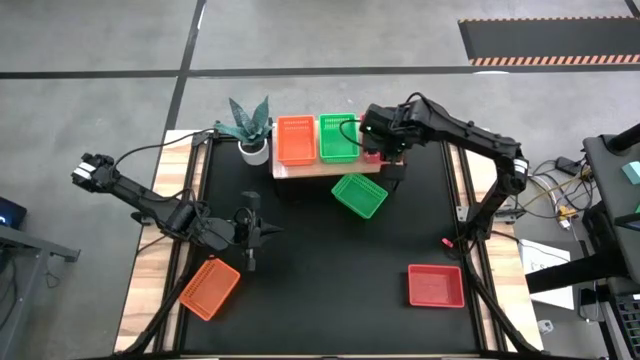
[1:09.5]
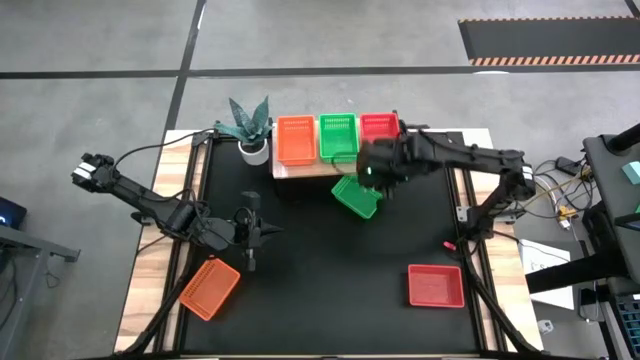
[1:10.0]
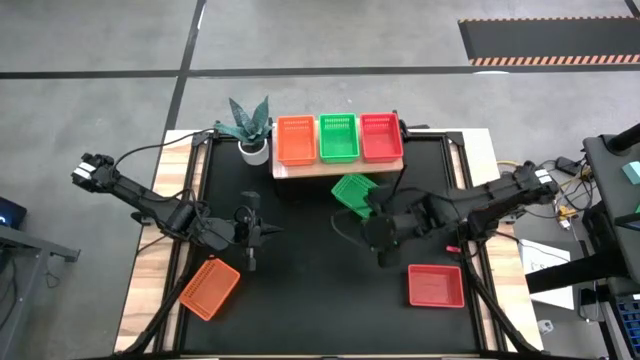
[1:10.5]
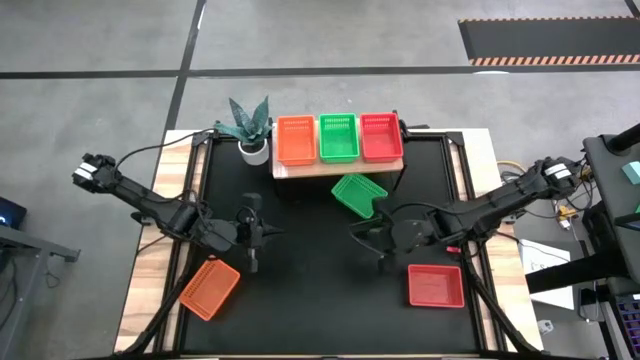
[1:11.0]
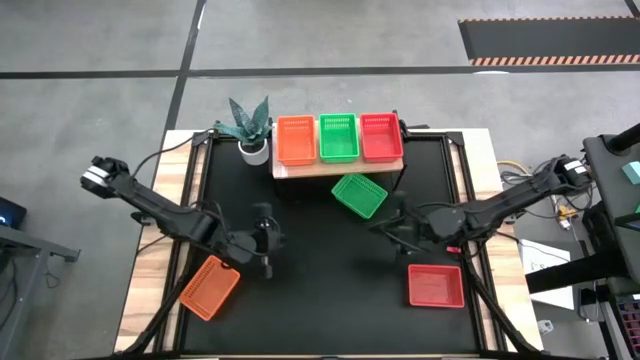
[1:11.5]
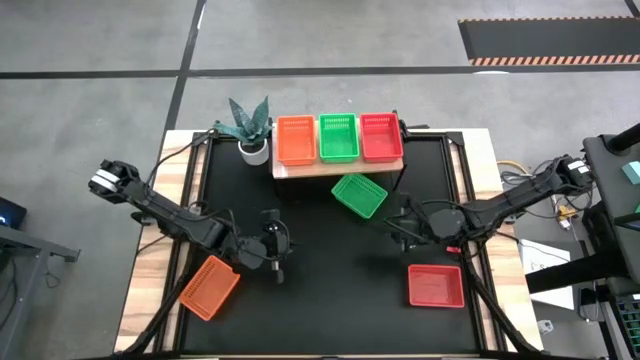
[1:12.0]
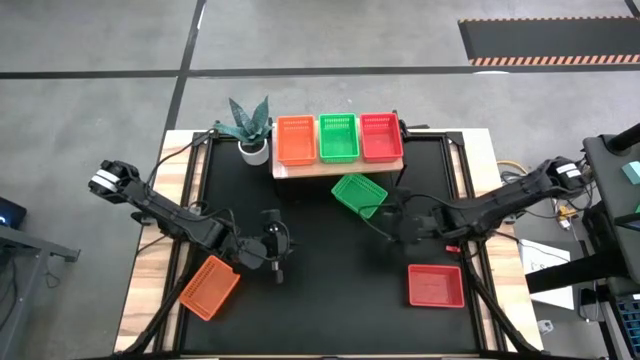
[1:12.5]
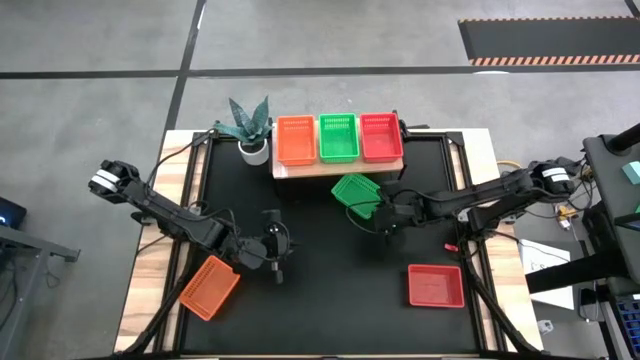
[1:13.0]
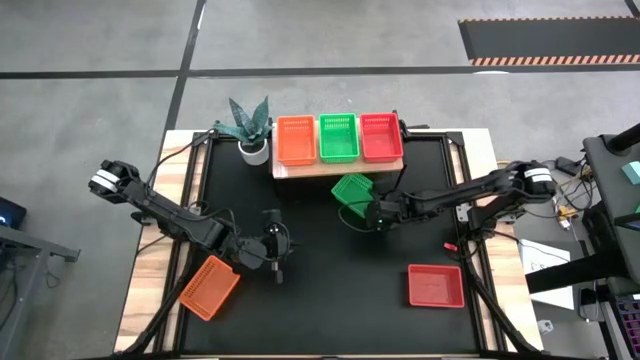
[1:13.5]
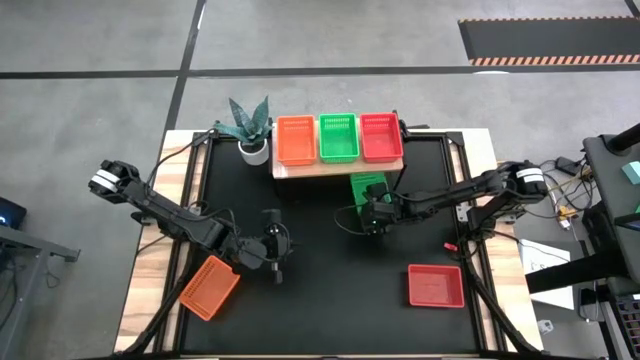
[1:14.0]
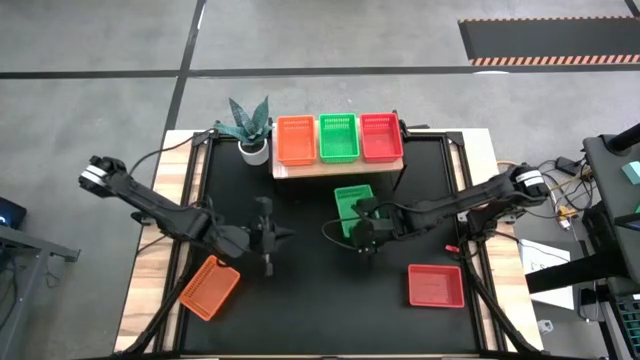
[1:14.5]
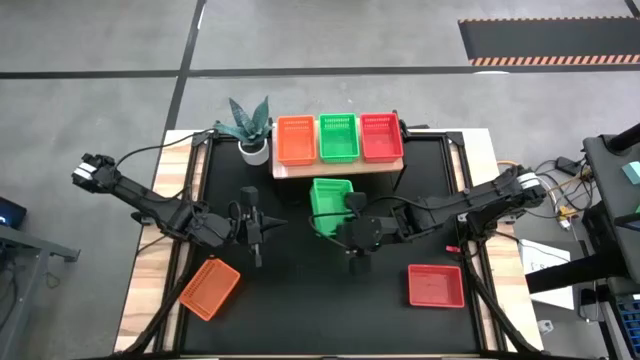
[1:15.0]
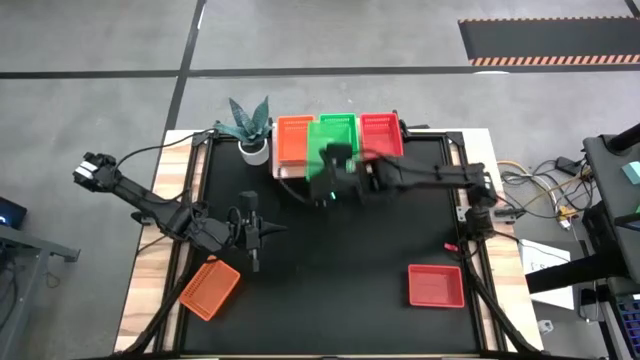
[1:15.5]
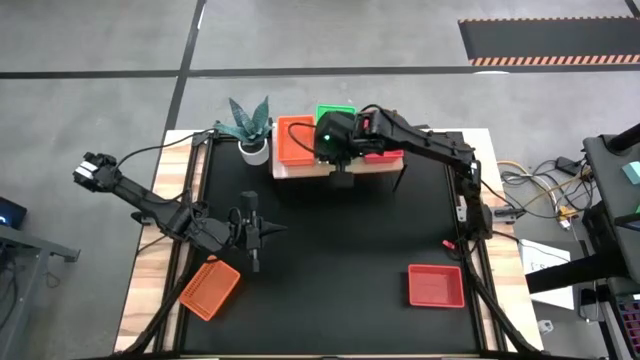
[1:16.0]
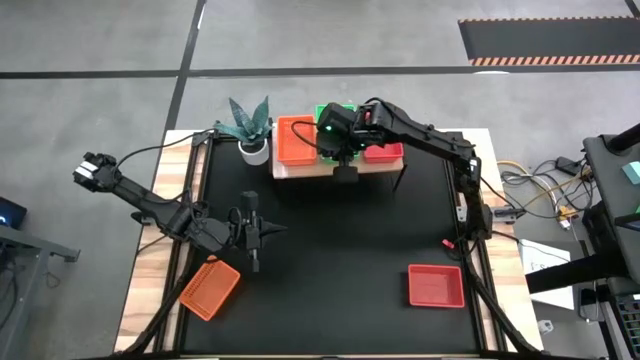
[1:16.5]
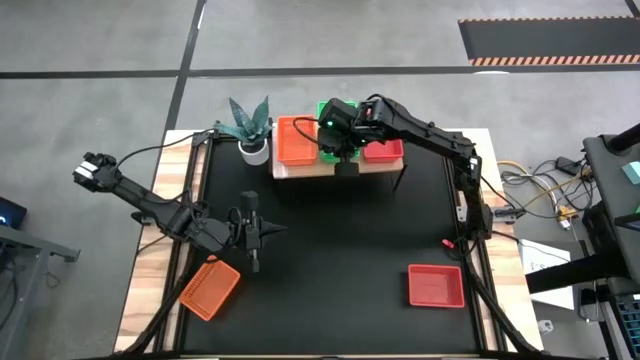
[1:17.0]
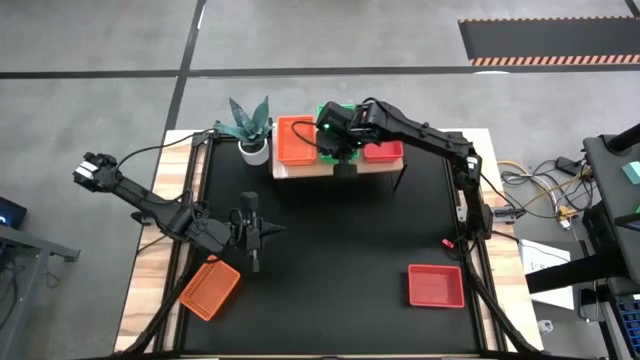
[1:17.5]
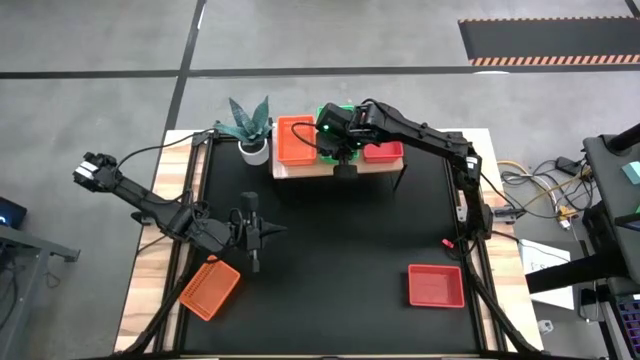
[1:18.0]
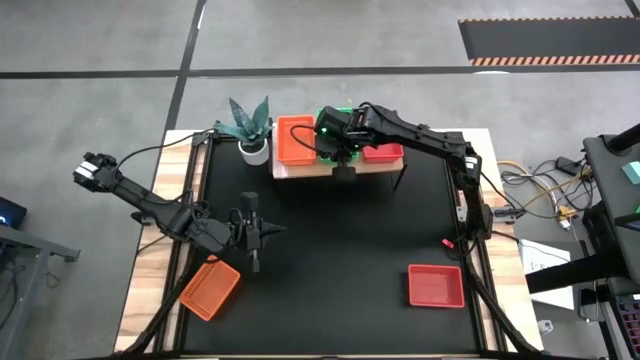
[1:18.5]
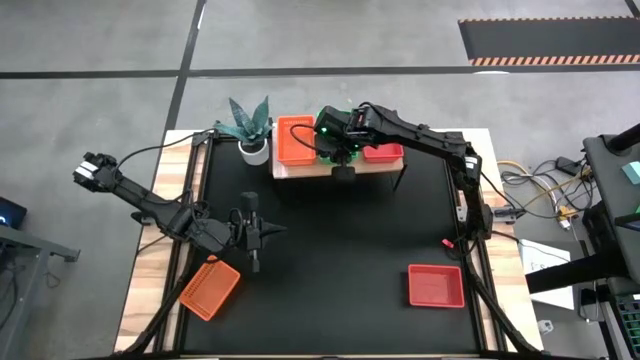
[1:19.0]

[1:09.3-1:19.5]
Task: Stack baskets on shelf by color
Stack the green bin on top of the green bins on the shelf

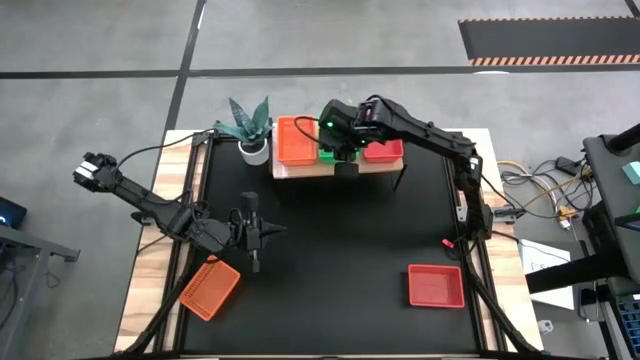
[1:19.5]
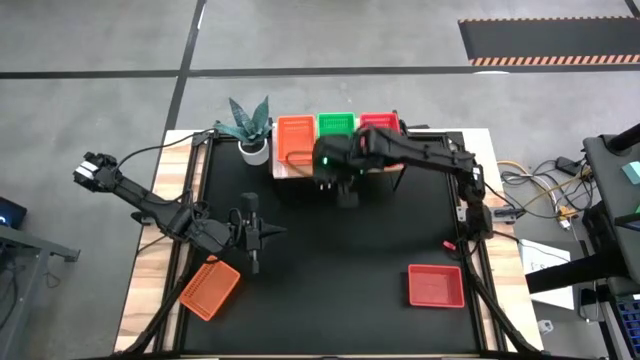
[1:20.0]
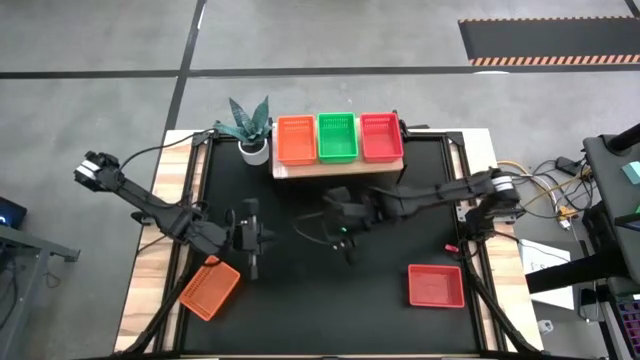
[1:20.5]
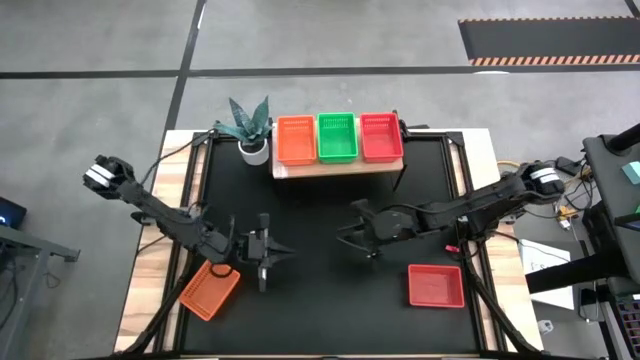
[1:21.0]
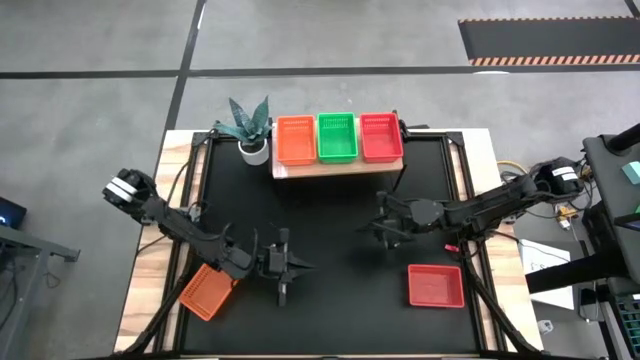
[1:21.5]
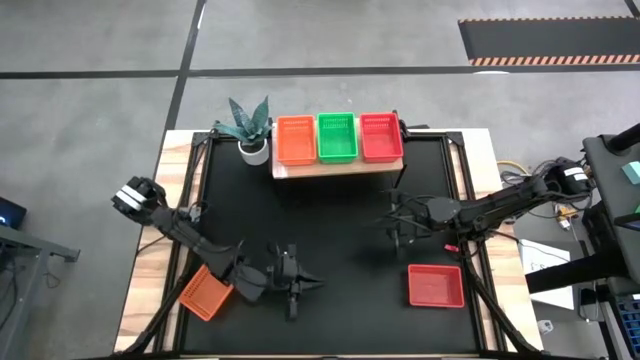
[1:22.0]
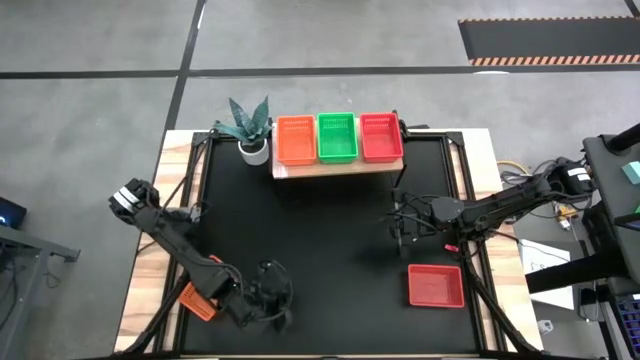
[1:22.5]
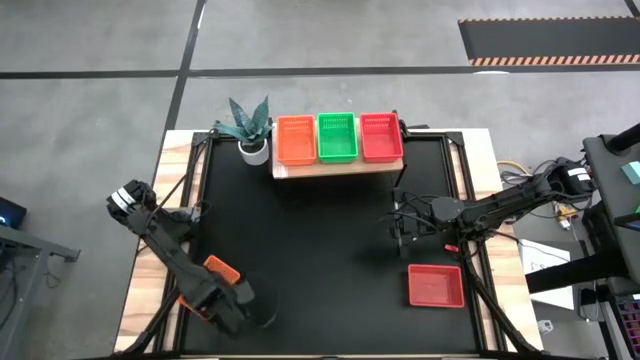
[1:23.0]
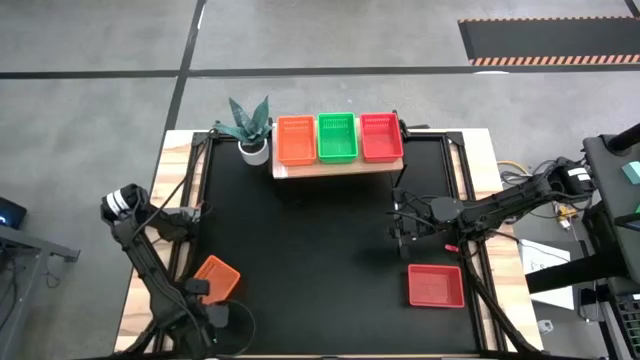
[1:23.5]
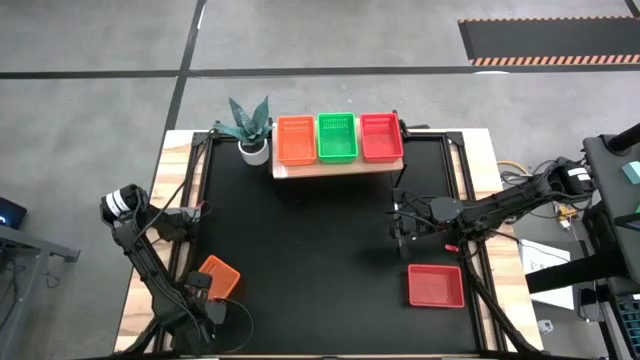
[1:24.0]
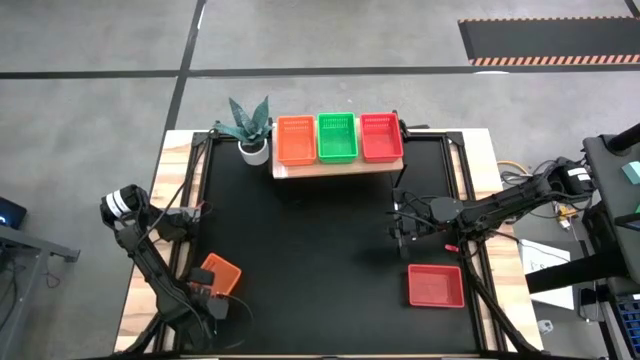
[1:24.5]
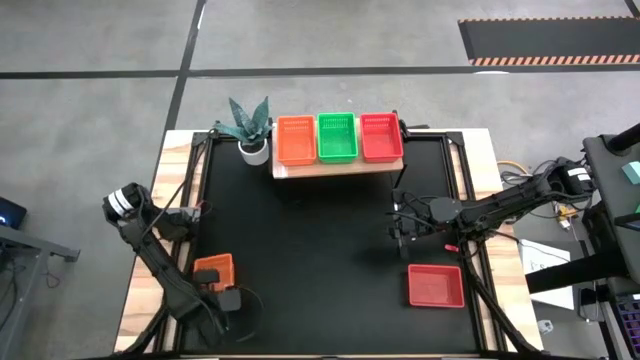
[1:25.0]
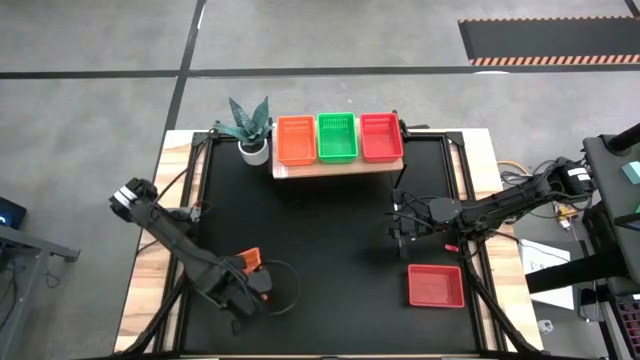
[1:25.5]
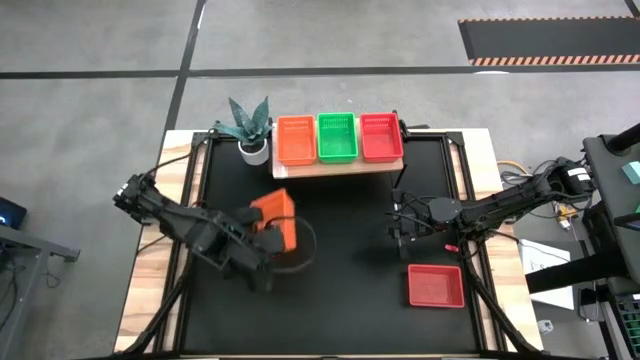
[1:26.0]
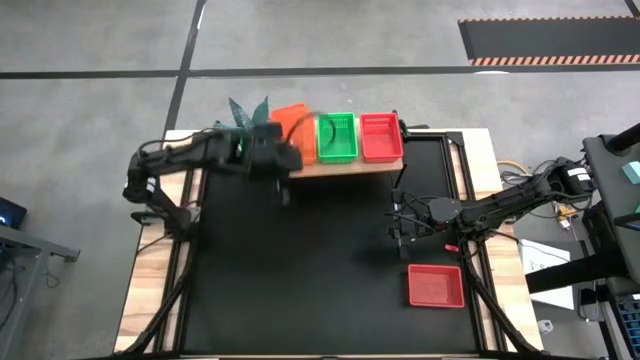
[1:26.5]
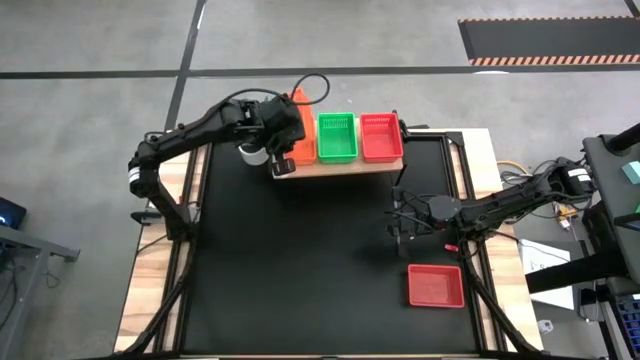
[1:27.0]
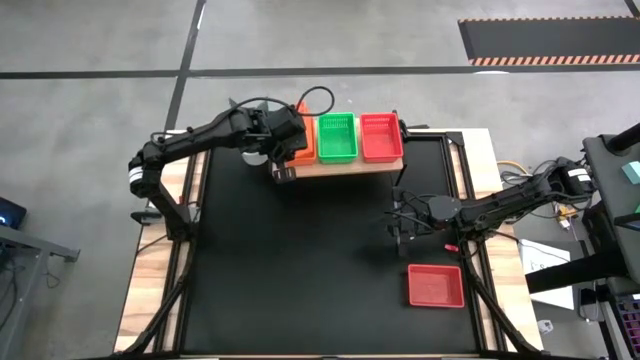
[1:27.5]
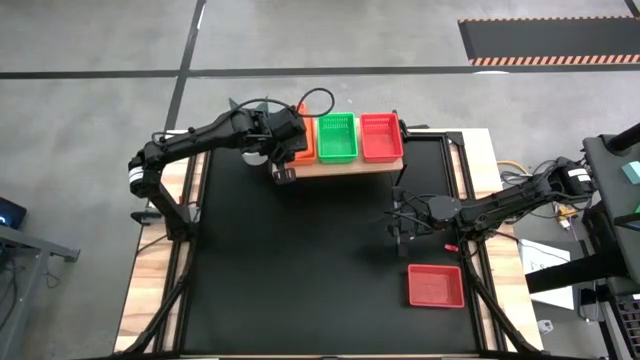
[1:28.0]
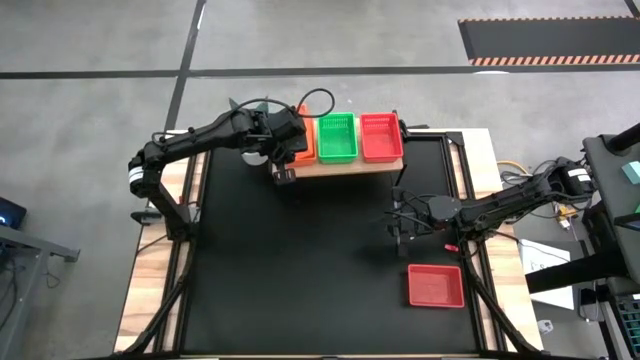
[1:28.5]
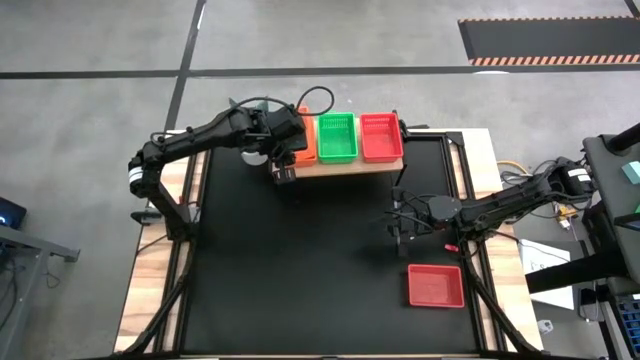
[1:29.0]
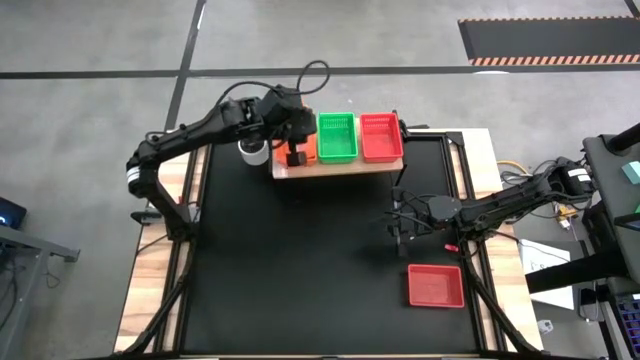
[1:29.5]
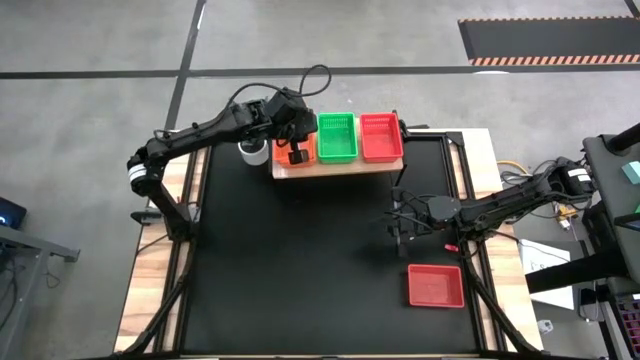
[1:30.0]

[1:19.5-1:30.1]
Stack the orange bin on top of the orange bins on the shelf
